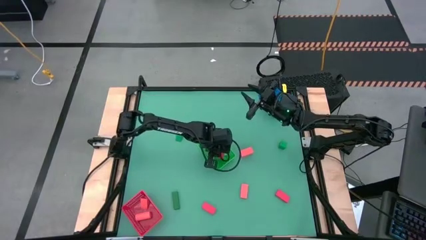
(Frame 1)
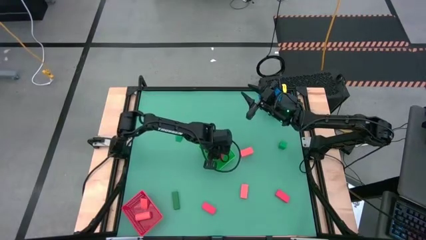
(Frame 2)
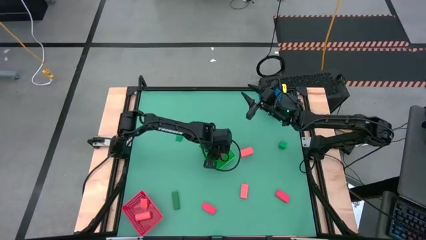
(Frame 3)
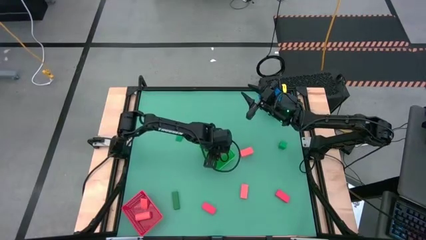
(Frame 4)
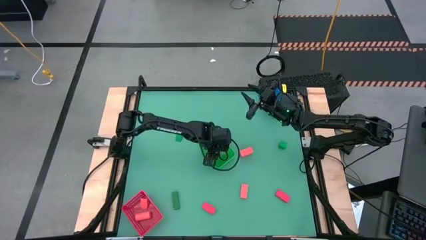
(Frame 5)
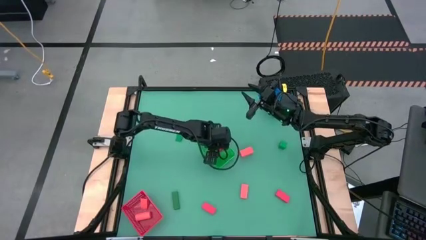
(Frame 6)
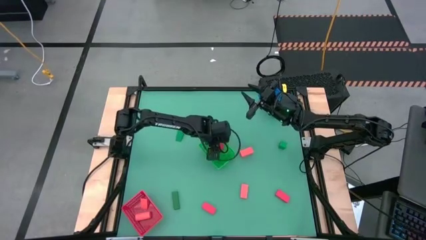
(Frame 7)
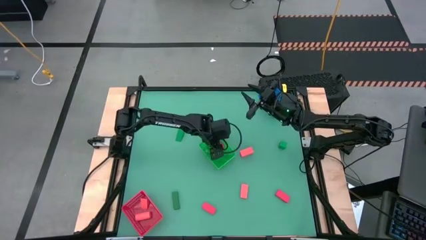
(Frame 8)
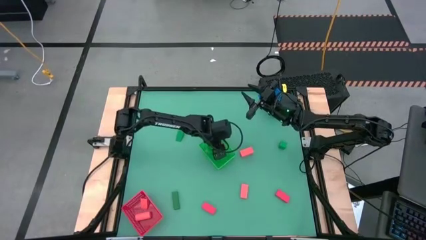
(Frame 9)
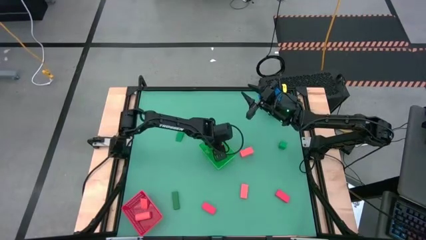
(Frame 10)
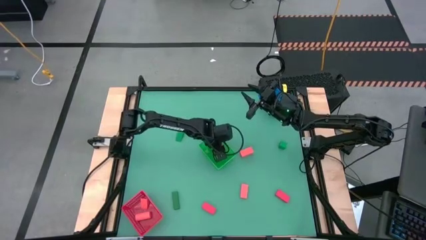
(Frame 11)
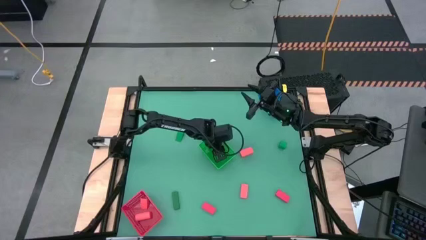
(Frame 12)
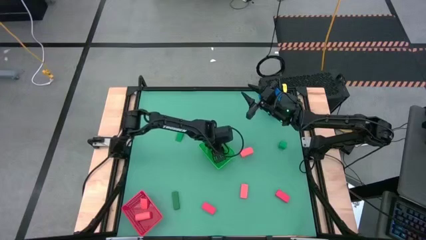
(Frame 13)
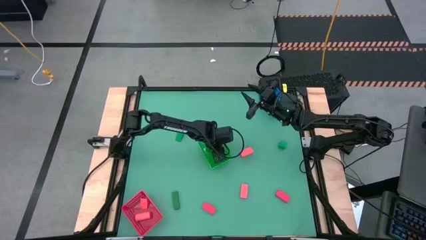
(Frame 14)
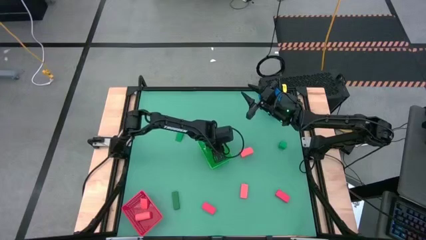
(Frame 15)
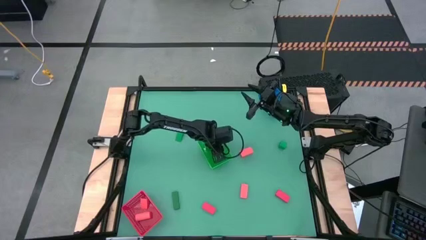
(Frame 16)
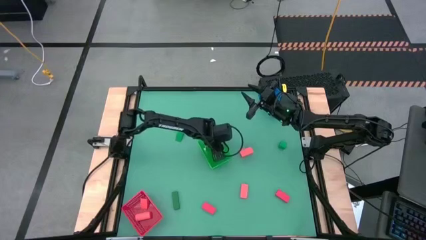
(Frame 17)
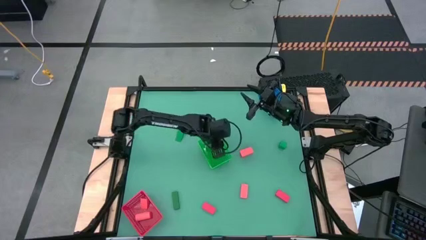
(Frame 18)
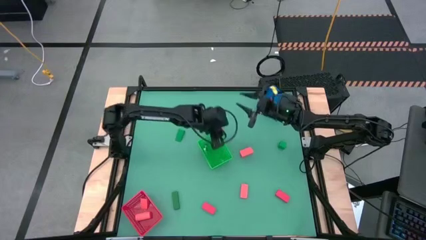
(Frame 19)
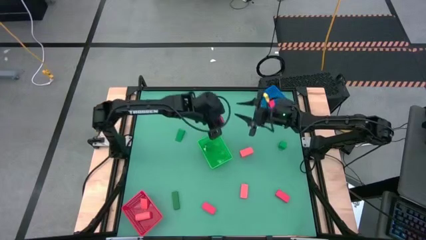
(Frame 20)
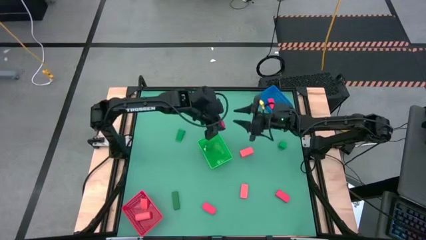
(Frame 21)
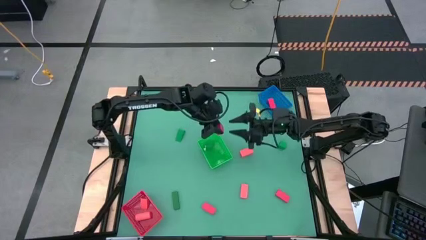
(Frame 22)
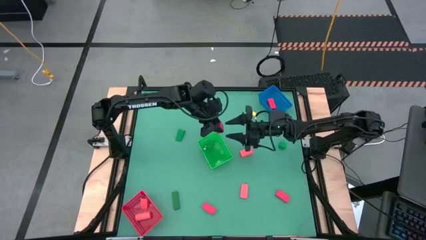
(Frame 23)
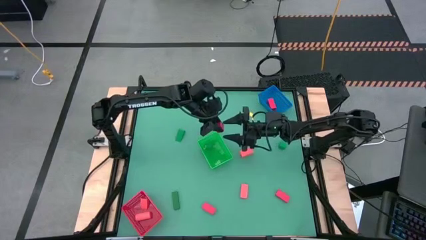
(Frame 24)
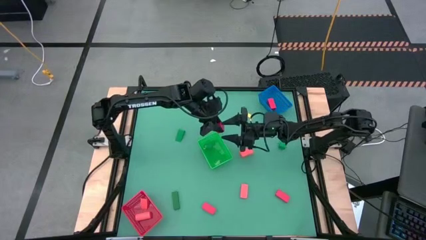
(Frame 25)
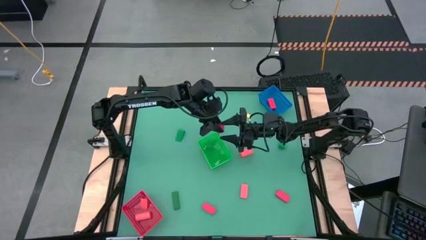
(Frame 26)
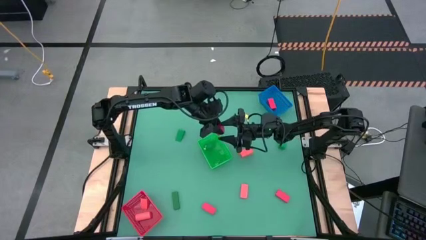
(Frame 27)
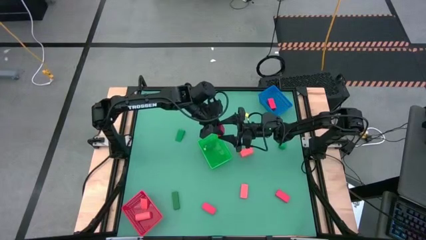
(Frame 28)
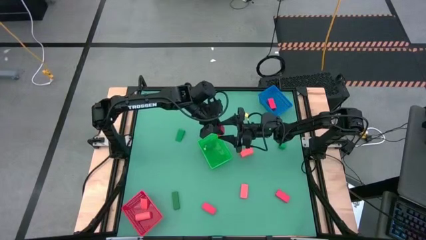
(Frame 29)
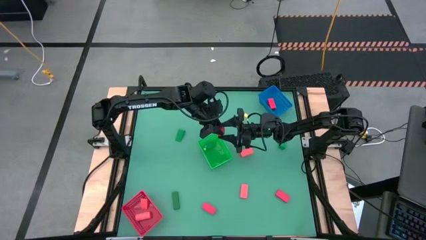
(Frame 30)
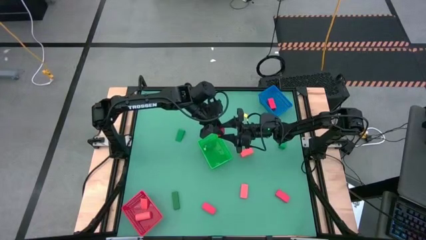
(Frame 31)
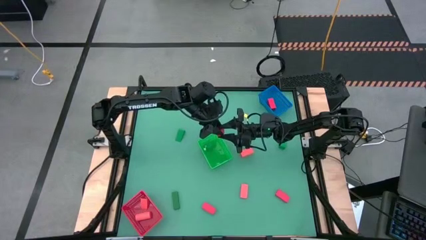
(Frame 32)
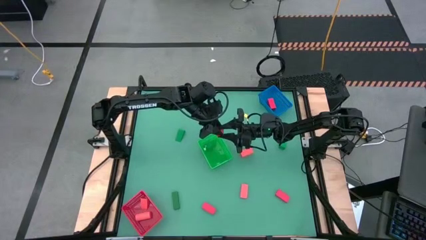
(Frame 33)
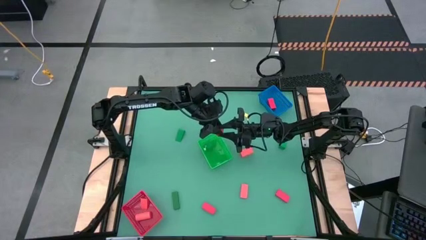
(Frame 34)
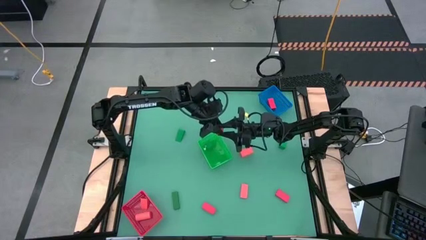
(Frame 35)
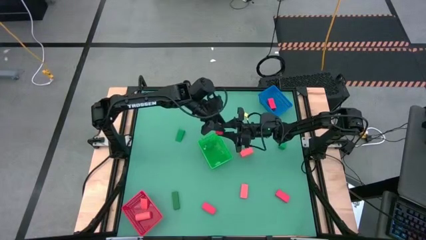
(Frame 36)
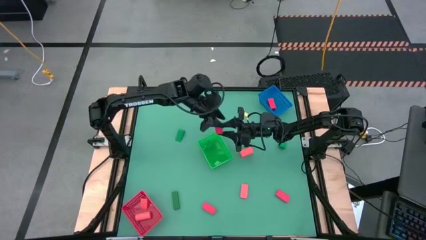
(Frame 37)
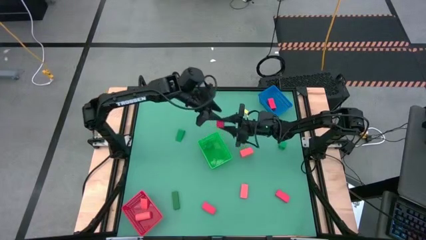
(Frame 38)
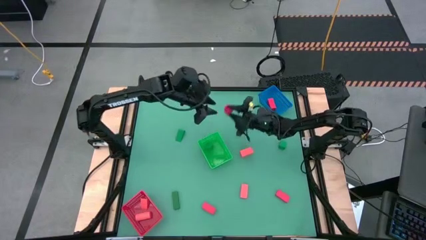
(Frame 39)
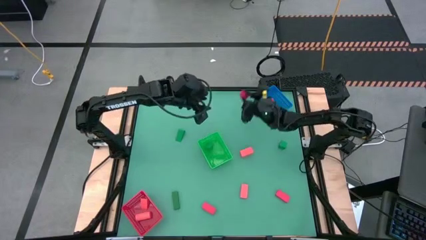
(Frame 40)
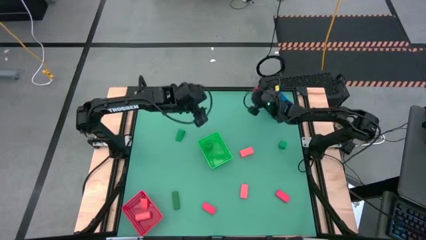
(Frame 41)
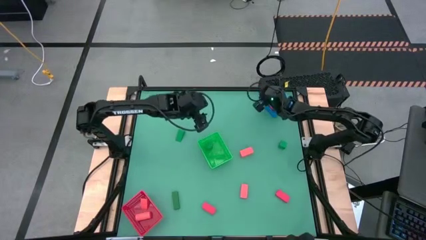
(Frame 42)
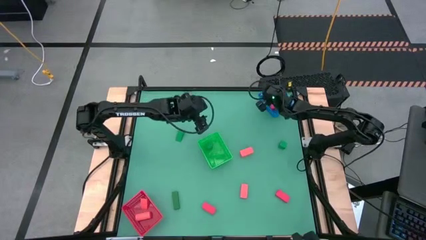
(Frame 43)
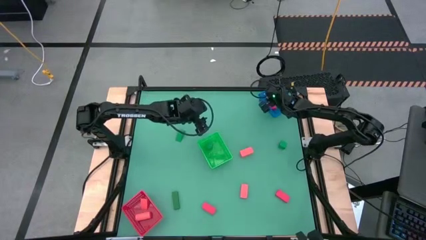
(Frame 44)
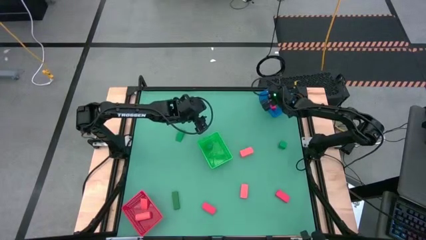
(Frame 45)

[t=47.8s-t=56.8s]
Task: Sort & place blocks by color
Put the light pink block into the blue bin

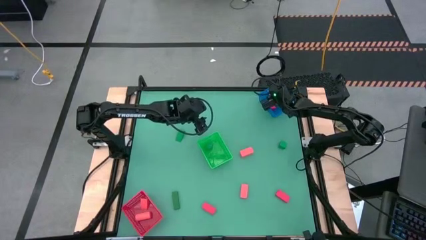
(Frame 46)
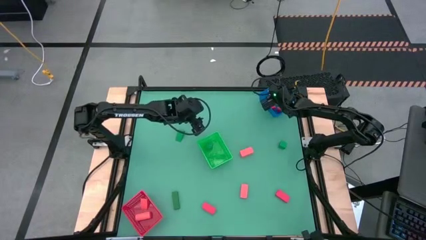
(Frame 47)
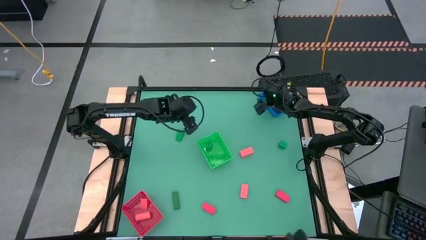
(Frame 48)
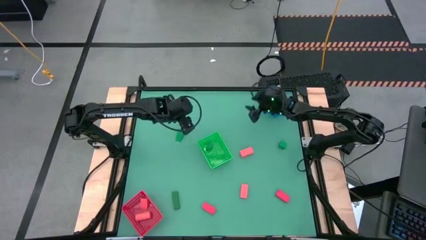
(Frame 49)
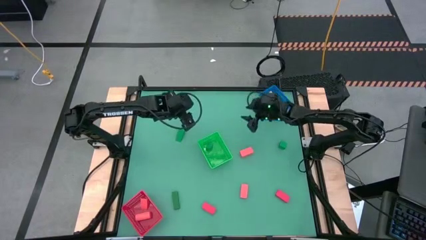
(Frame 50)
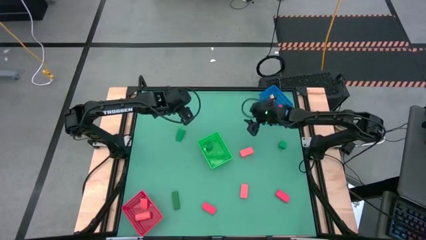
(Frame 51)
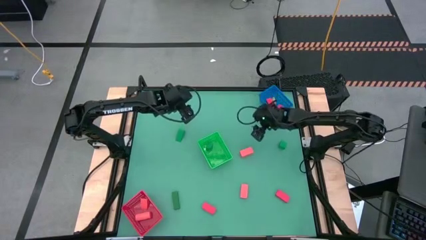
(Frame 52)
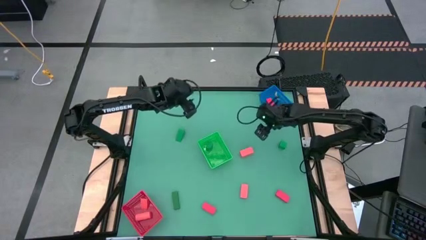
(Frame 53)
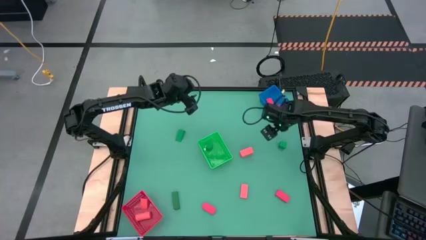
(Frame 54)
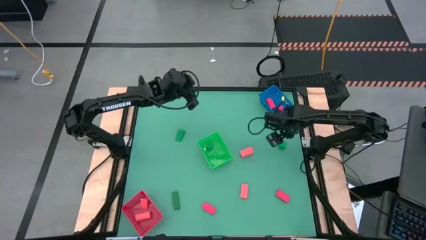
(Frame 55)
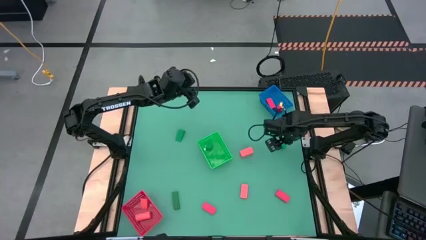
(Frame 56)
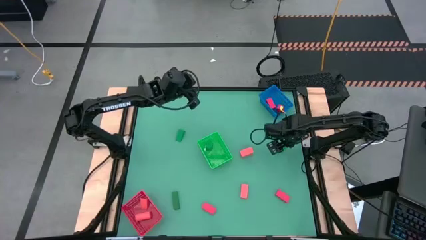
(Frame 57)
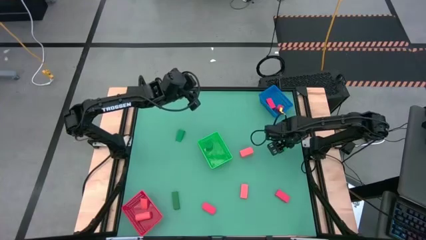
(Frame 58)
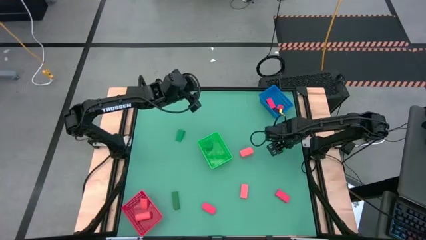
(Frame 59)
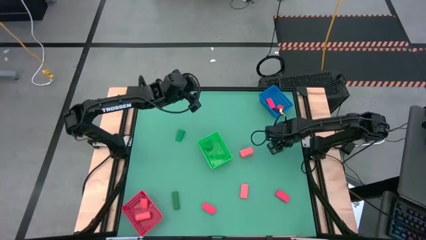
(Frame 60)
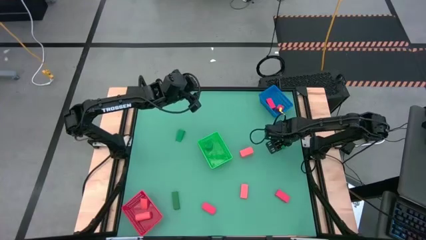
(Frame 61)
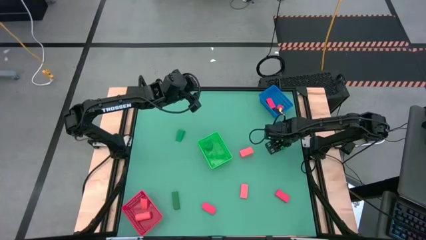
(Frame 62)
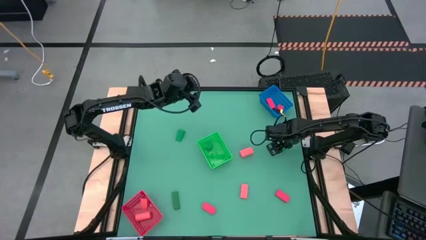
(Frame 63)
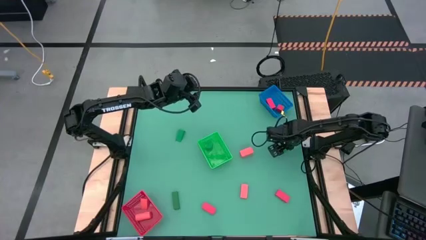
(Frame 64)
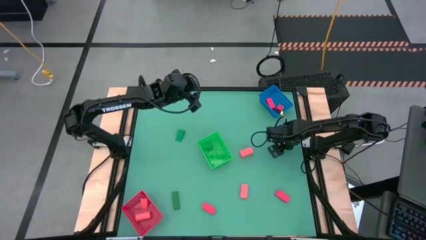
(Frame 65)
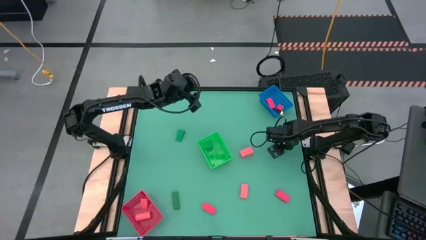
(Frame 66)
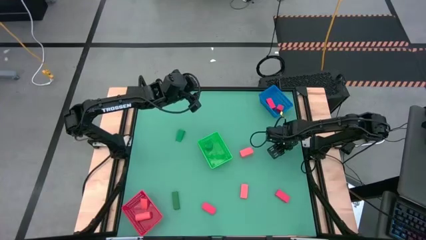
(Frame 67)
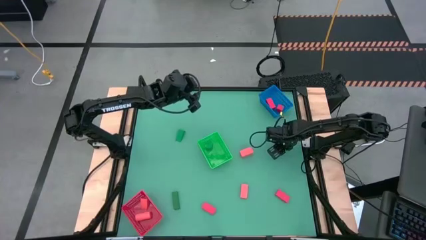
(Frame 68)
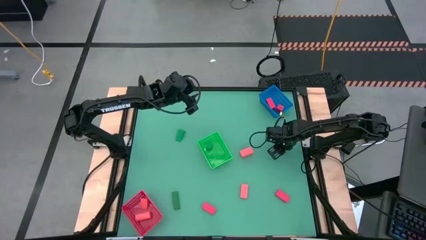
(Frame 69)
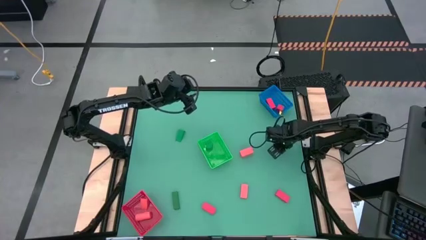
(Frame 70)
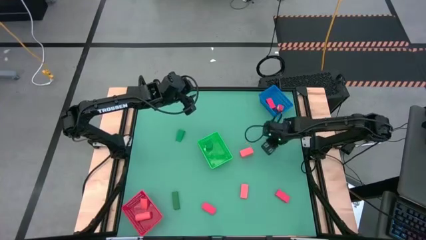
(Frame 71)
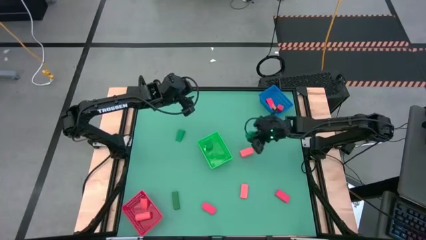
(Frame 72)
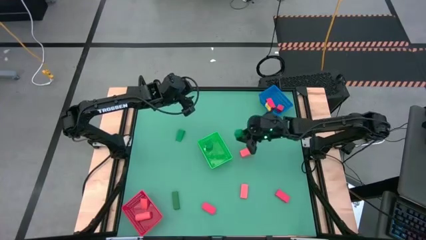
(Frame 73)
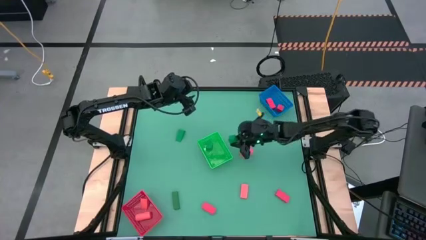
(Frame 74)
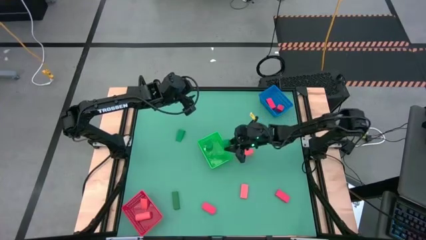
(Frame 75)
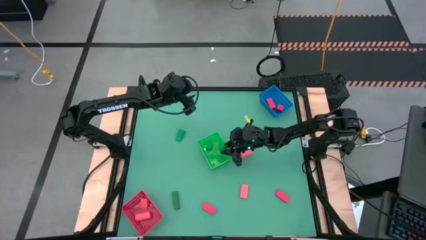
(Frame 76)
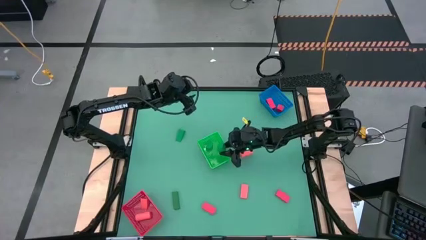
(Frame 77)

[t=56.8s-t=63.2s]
Put the green block into the green bin
